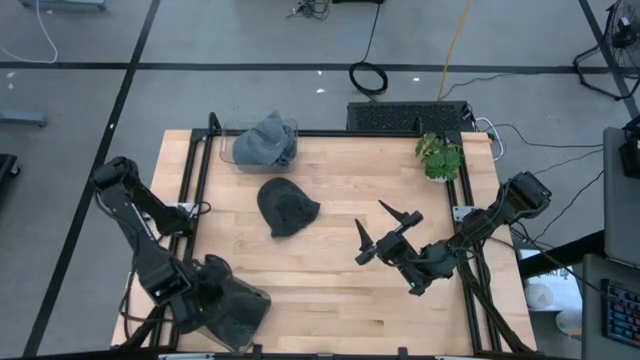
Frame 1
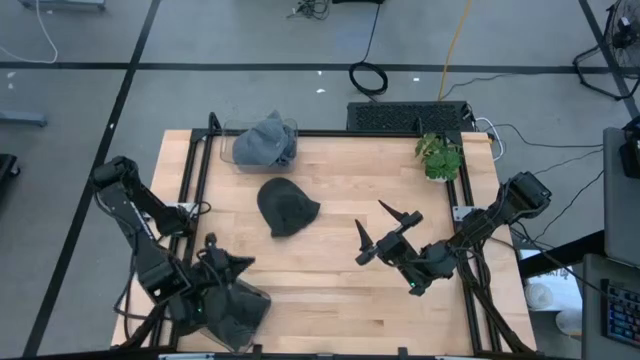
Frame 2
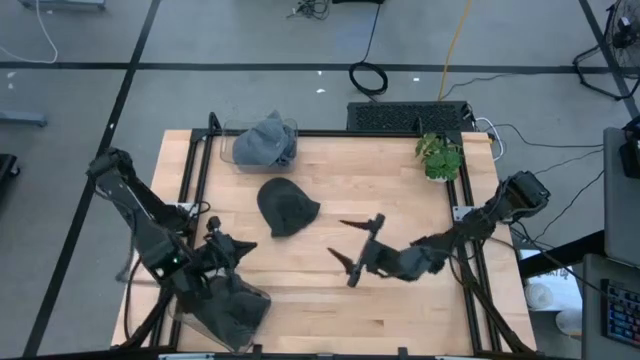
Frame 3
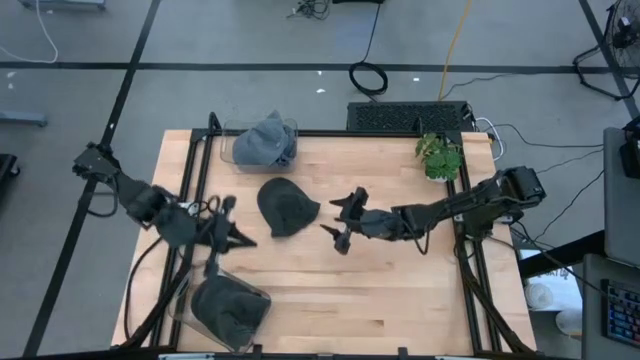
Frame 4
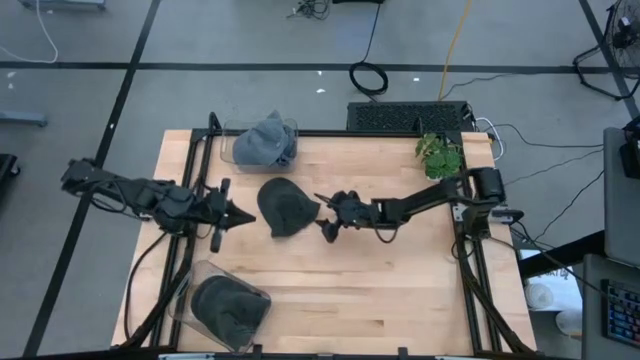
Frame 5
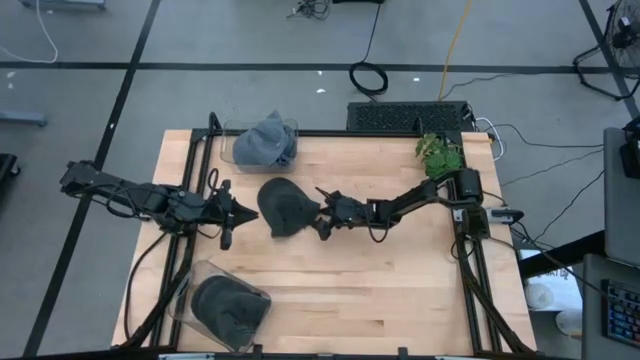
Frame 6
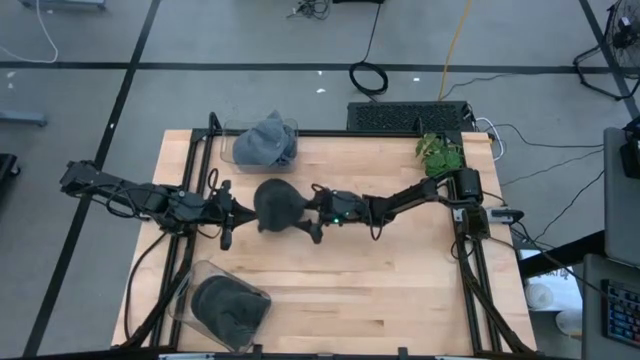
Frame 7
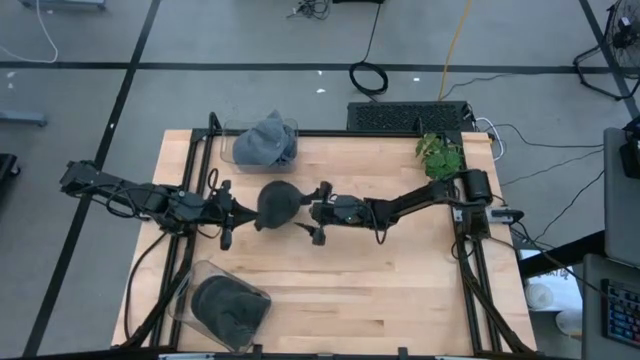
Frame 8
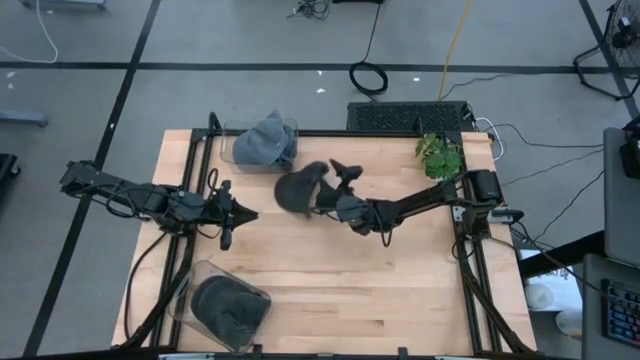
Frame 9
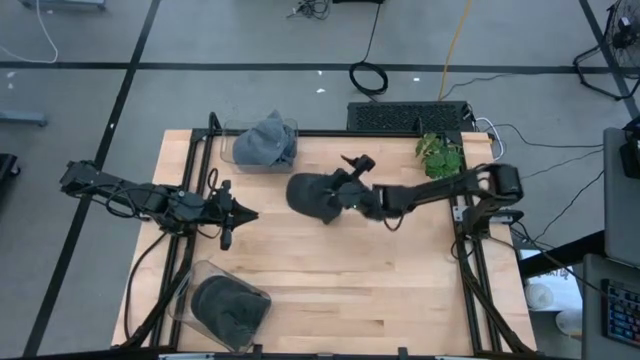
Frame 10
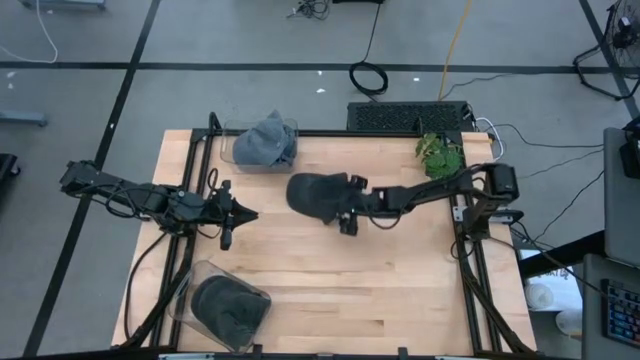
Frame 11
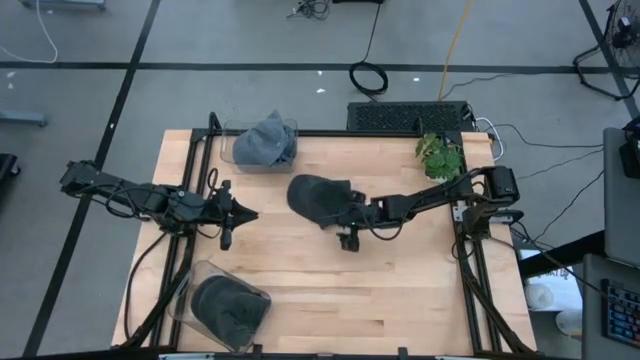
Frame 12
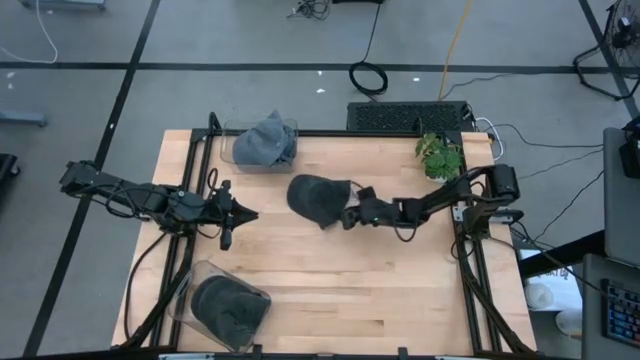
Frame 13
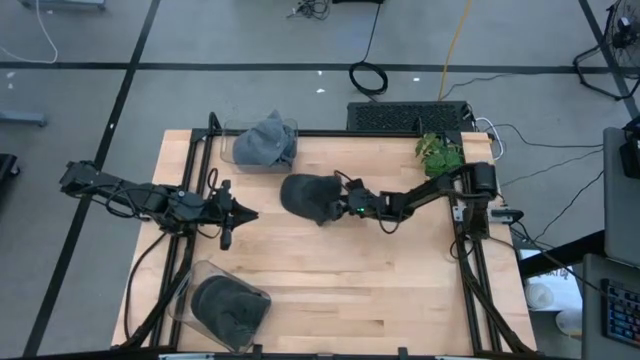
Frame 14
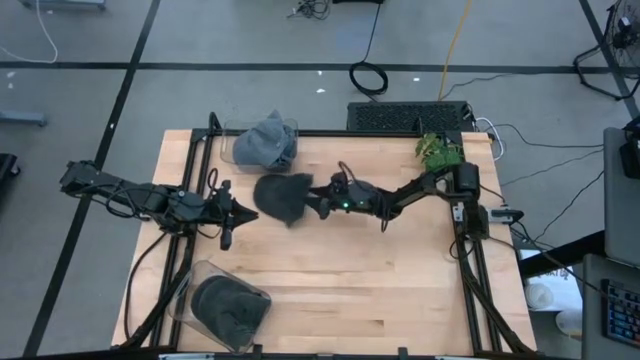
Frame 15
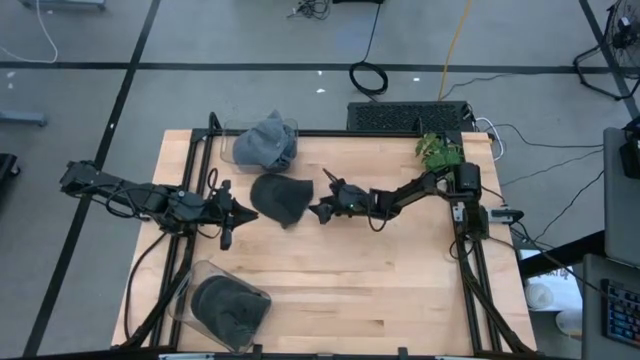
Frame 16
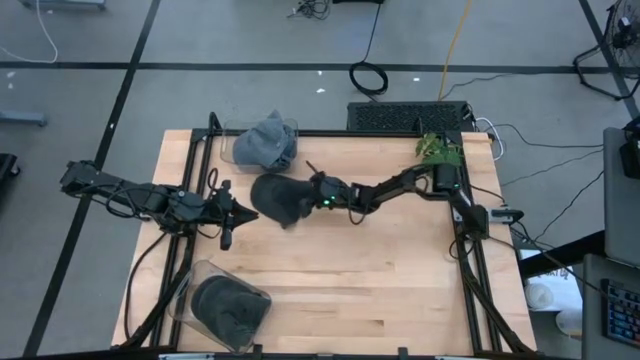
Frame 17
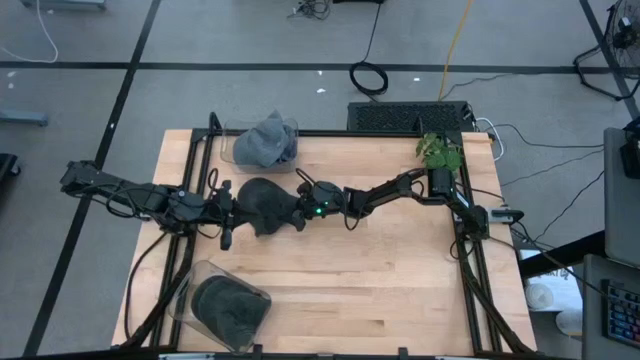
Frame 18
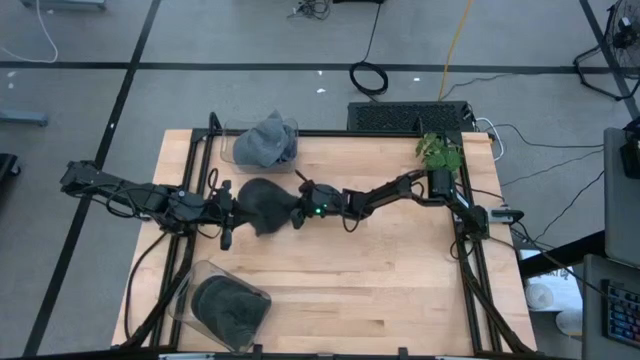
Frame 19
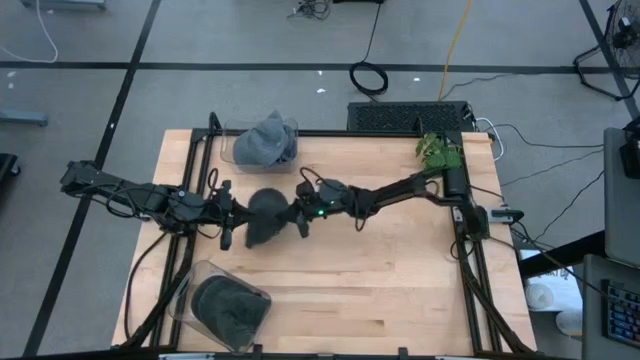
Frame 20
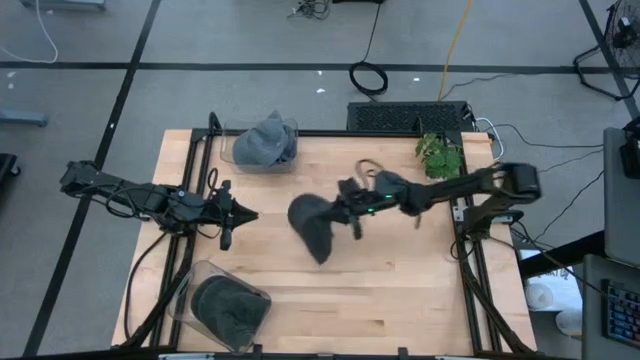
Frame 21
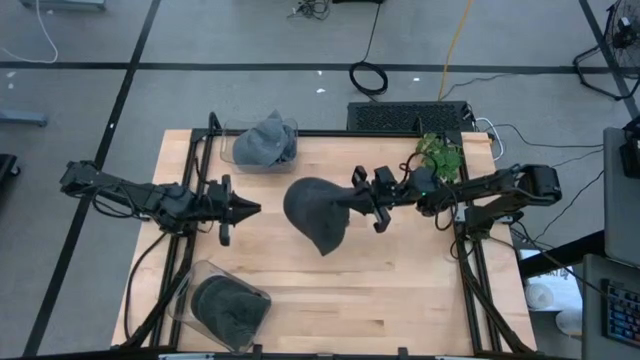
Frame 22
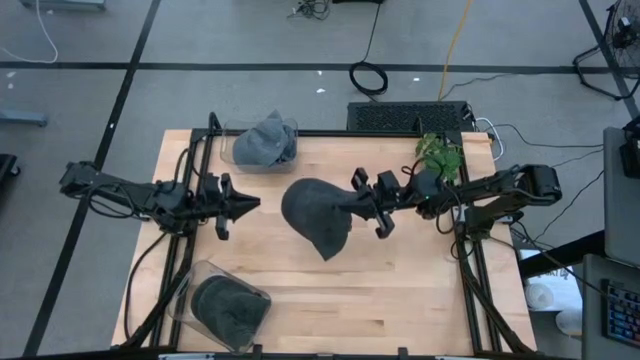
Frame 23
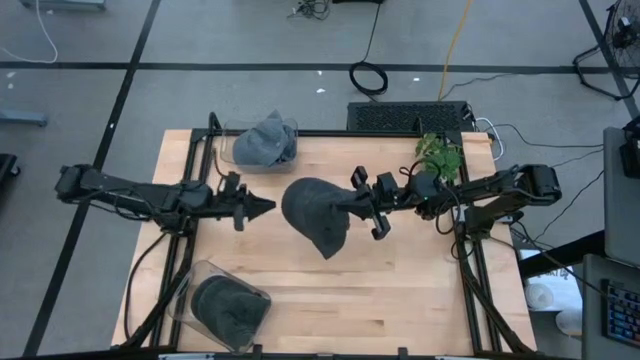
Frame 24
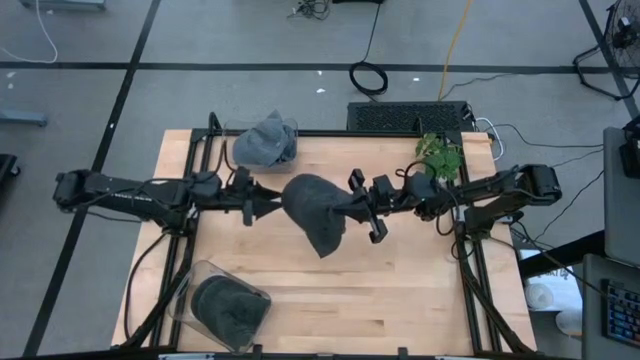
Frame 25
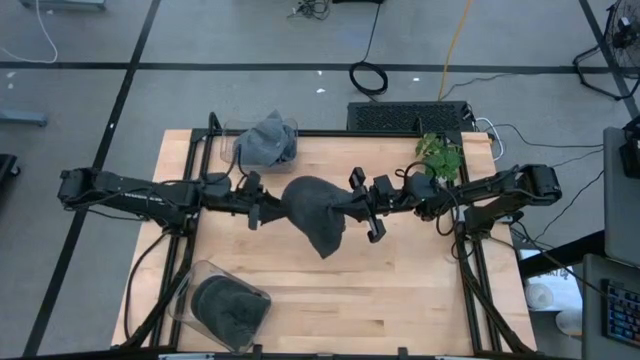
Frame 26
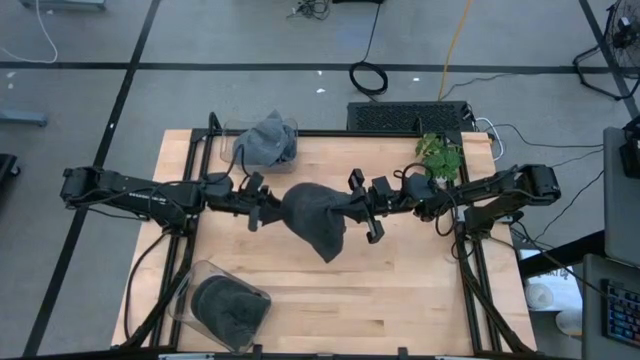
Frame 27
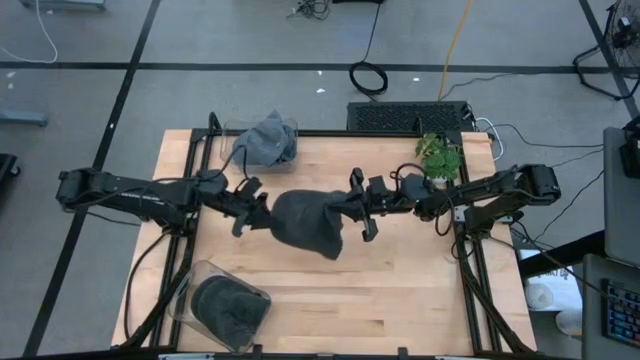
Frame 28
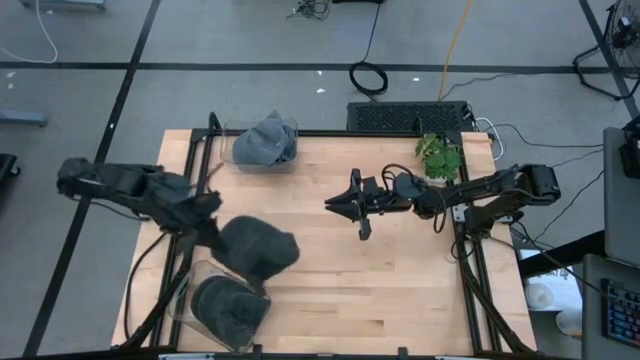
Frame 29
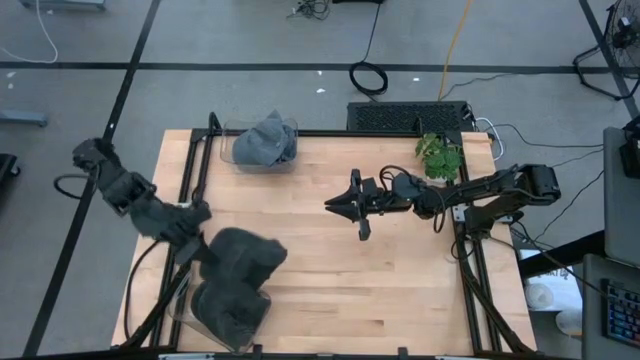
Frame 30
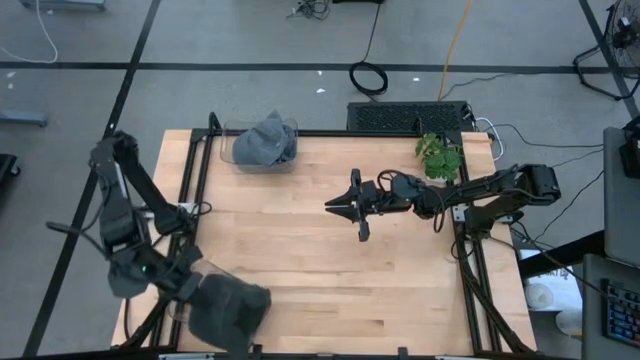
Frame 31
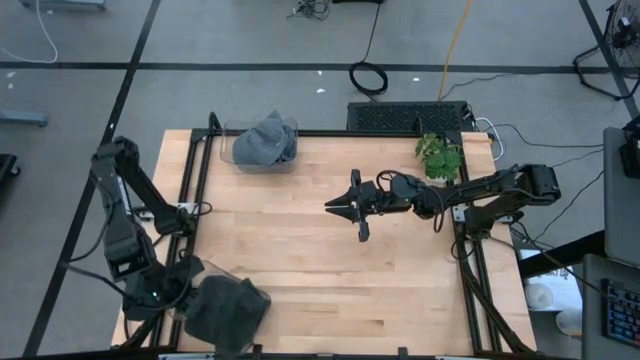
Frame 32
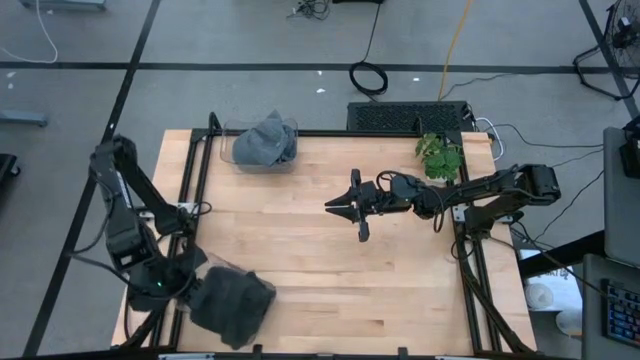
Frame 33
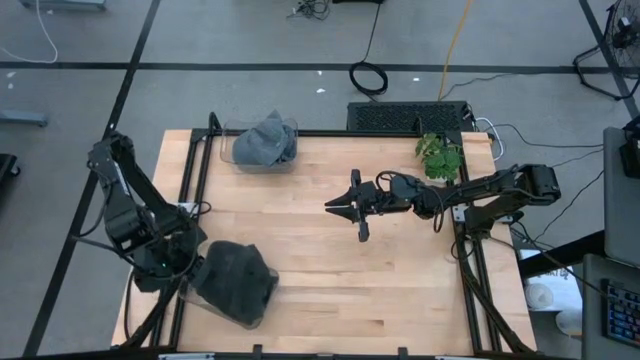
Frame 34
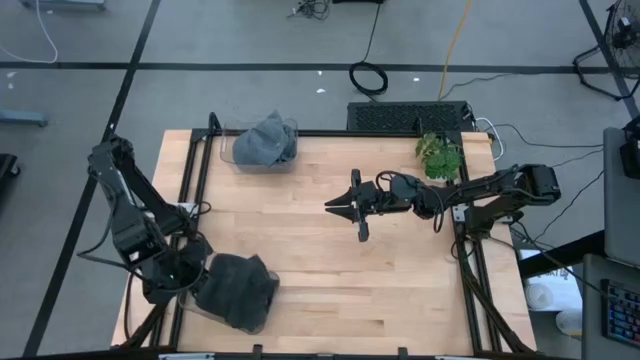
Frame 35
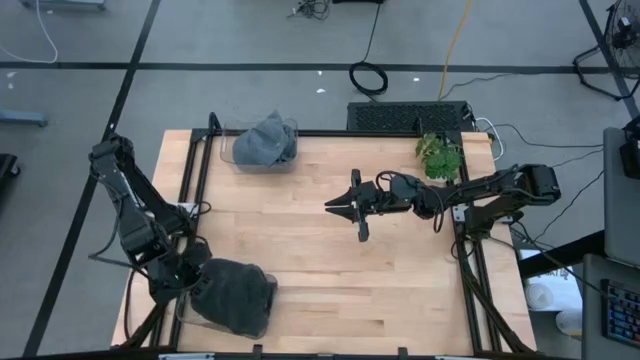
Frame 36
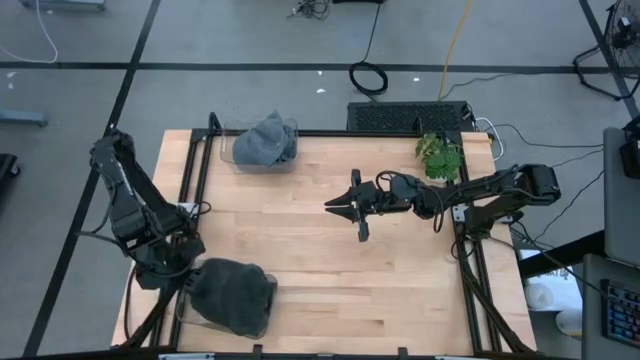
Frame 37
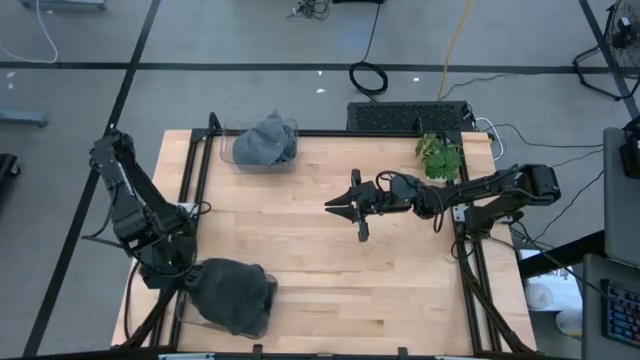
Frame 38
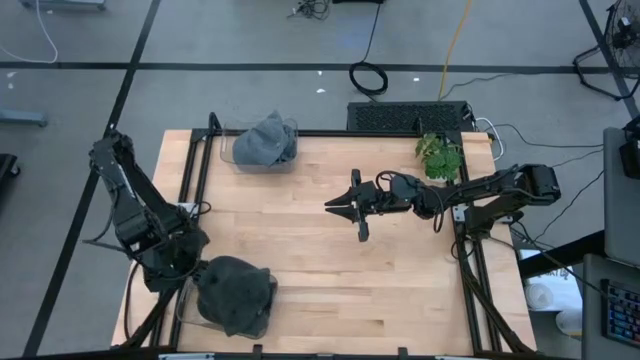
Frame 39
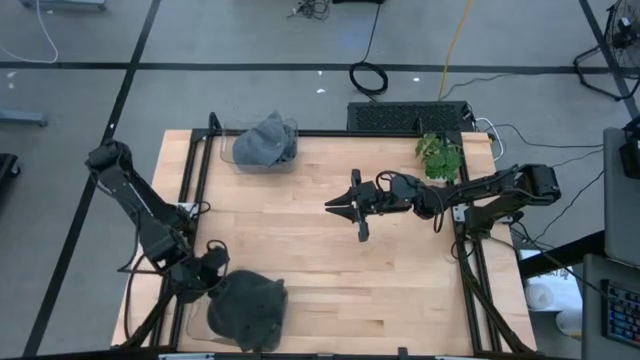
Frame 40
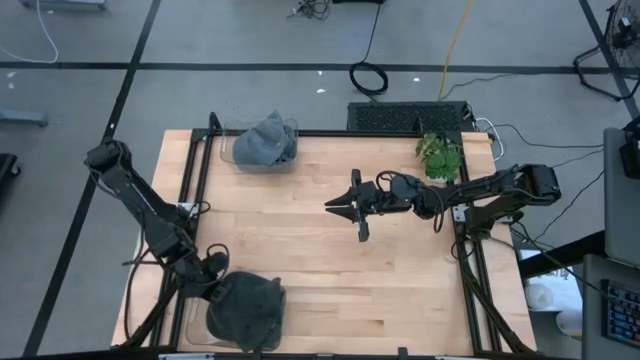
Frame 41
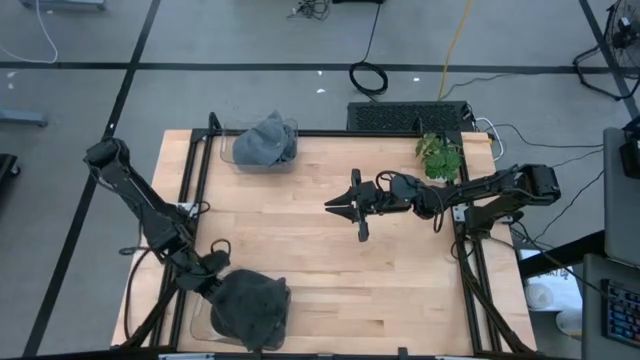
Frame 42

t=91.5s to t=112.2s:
Task: Pick & Place hat
Put the black cap into the bottom transparent bin

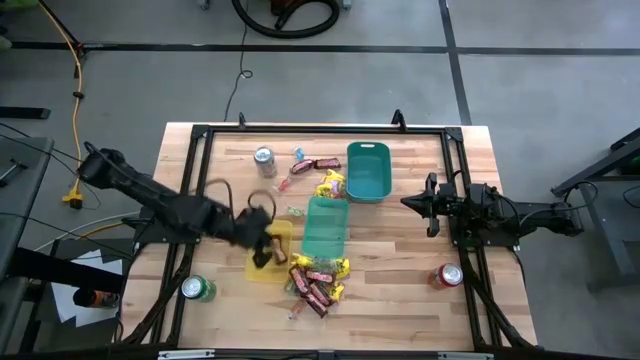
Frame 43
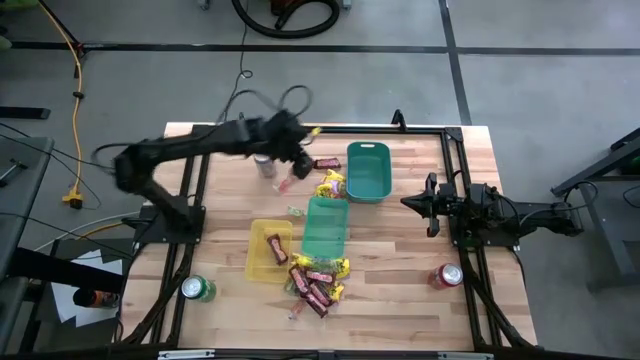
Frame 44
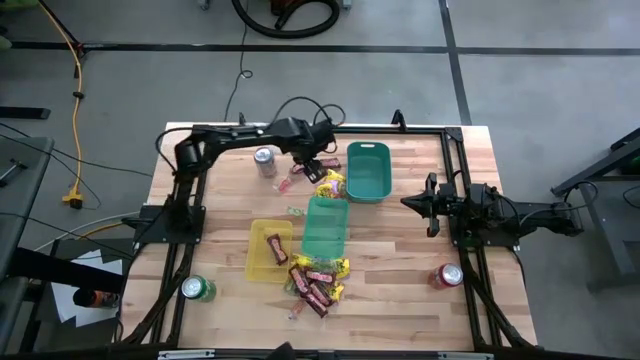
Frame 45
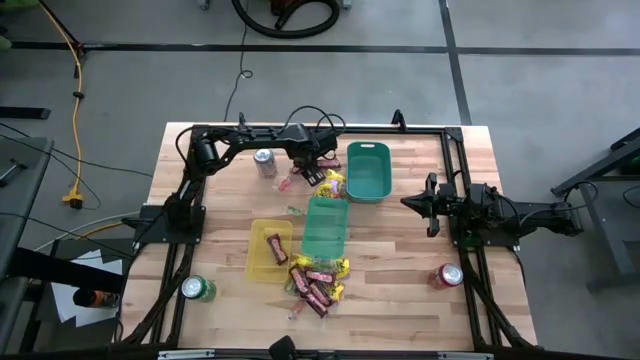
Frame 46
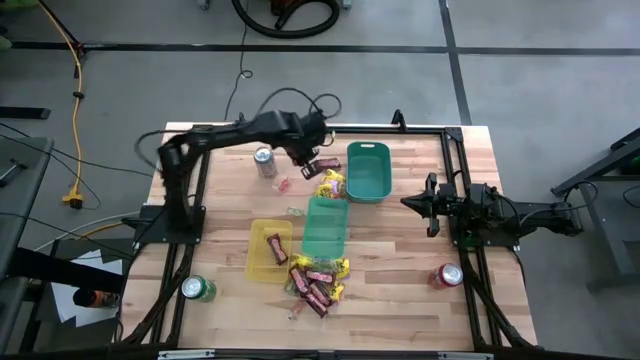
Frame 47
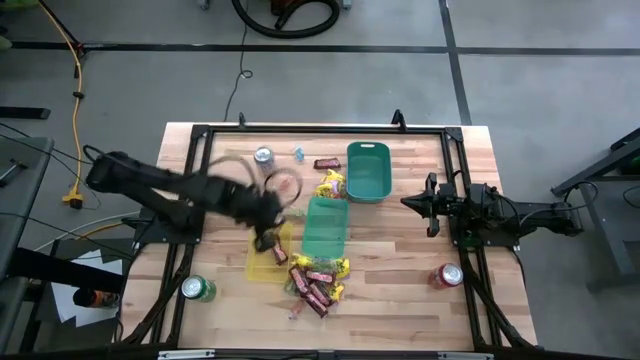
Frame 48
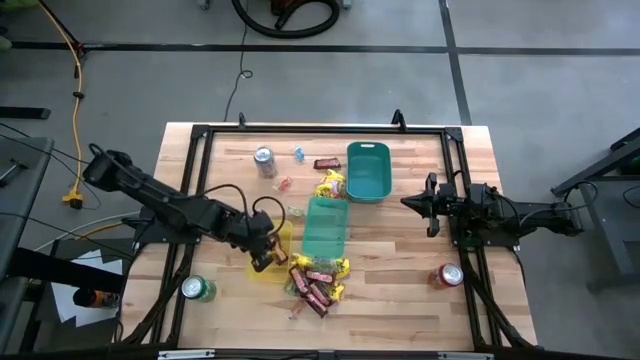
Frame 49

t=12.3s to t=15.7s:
Task: Sort candy
Put the brown chocolate bar into the yellow bin
